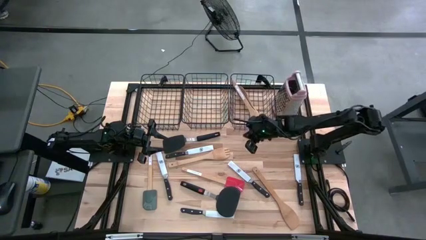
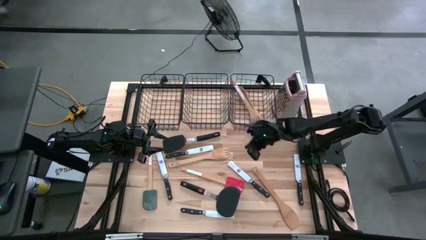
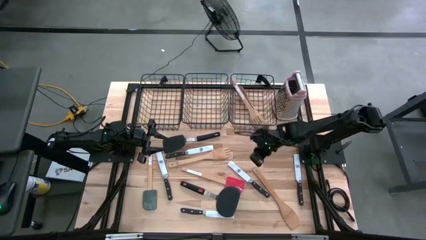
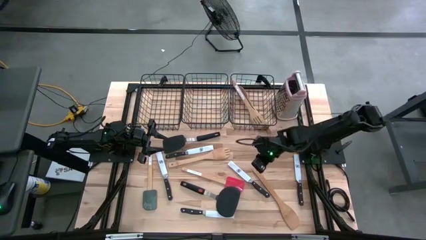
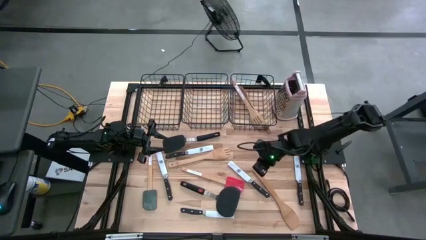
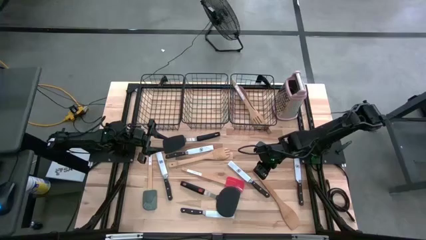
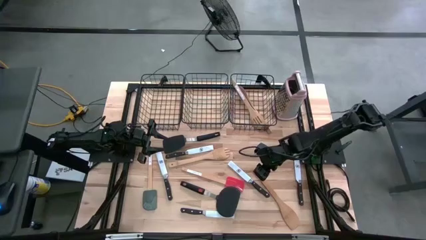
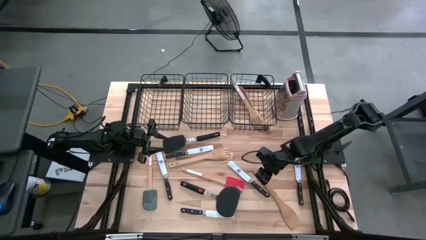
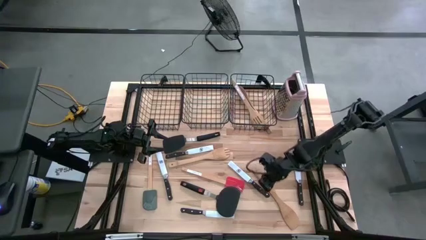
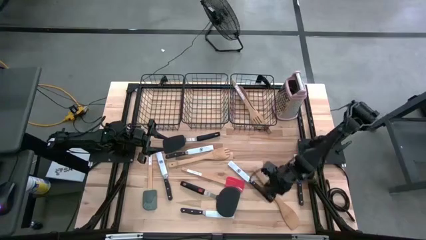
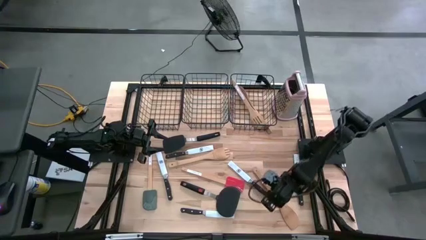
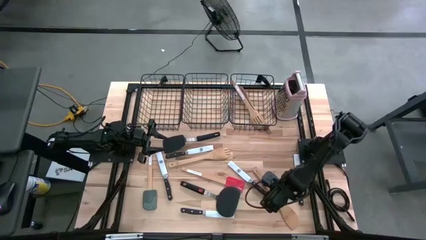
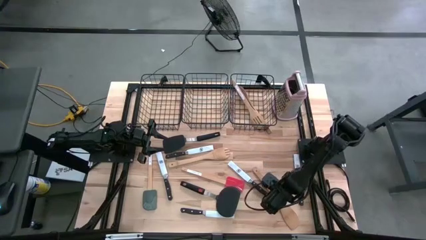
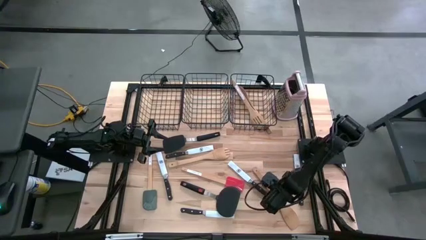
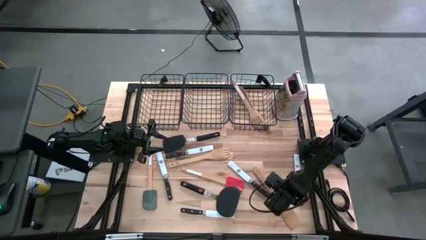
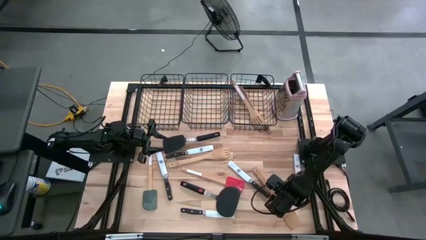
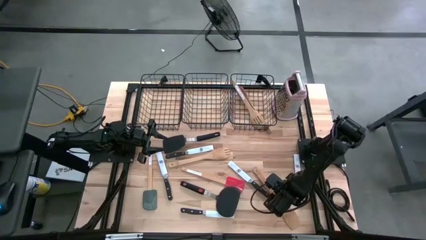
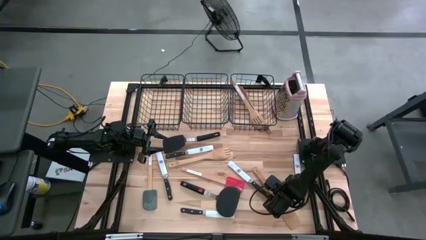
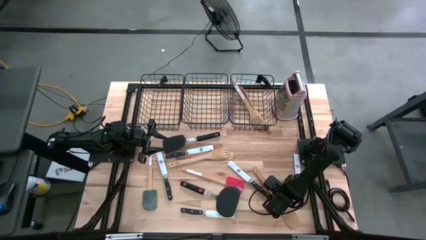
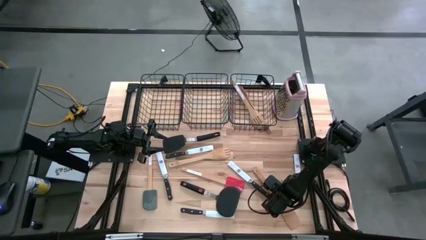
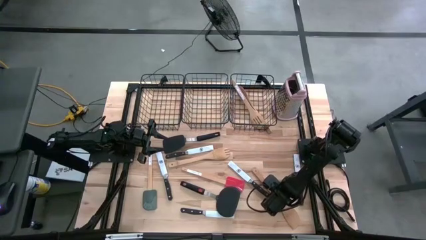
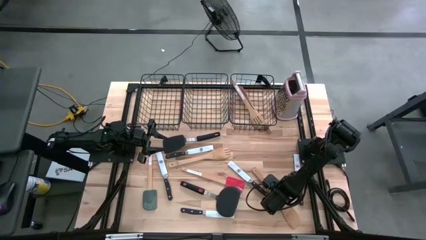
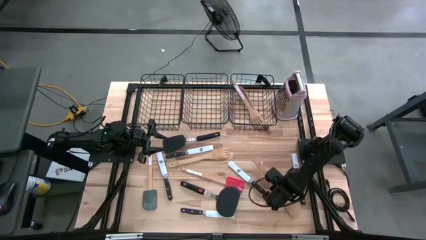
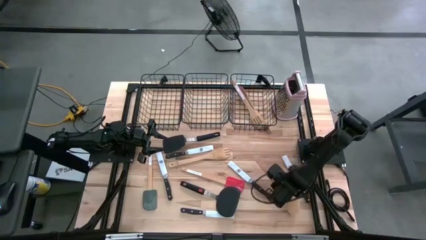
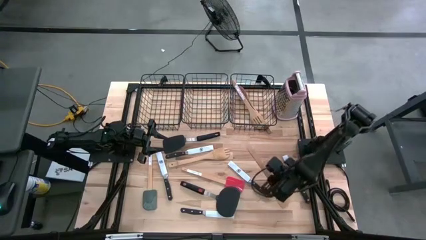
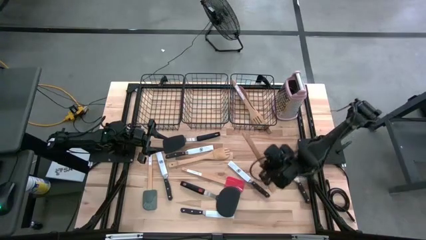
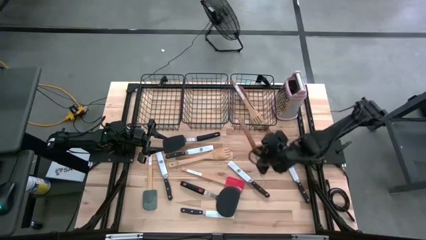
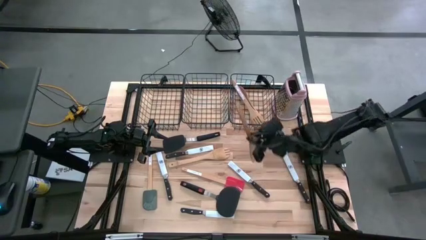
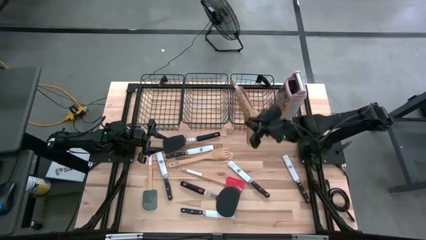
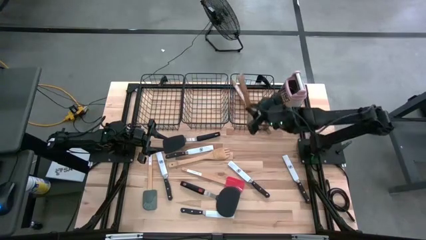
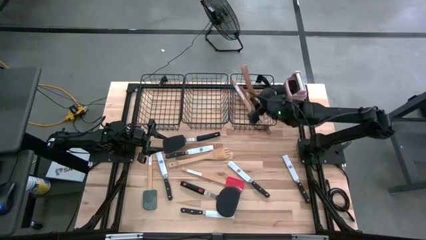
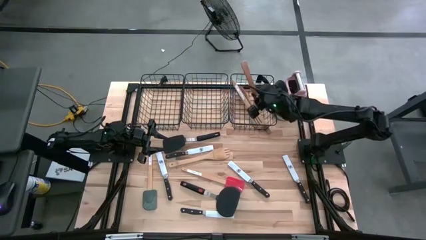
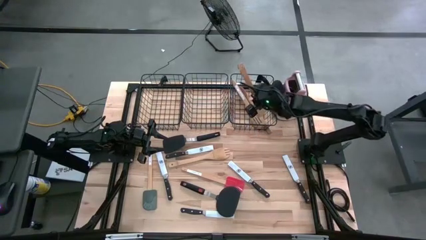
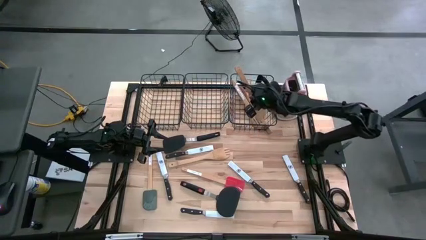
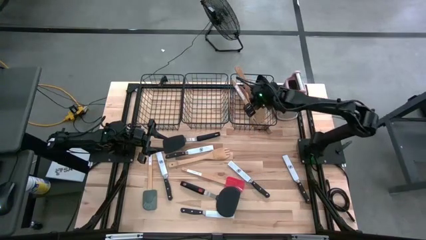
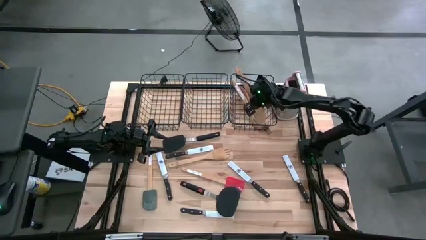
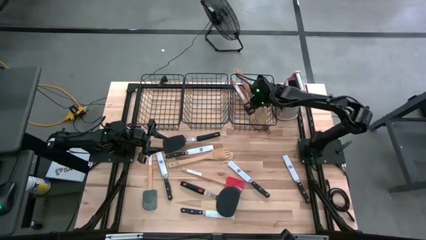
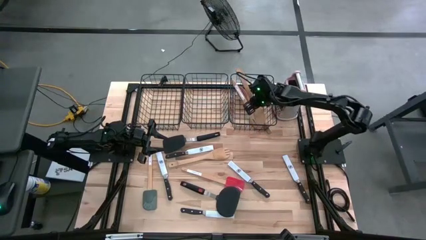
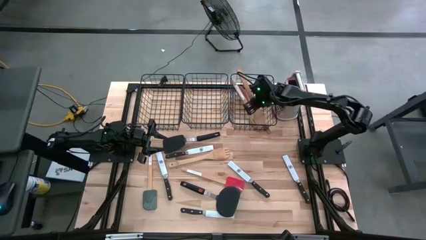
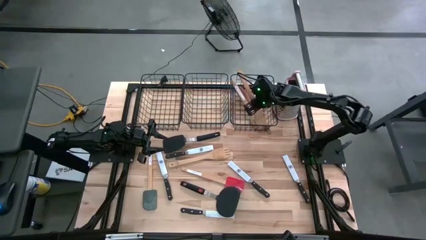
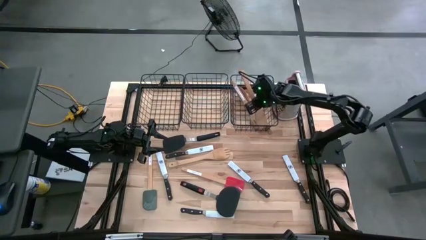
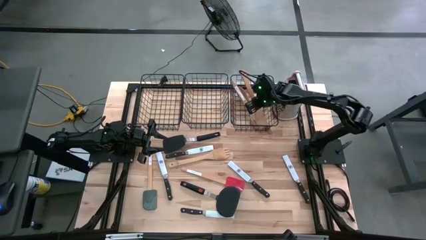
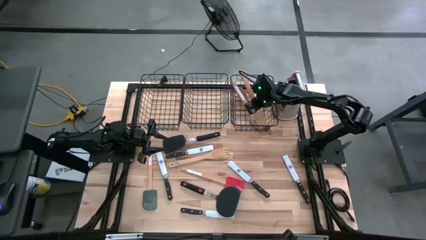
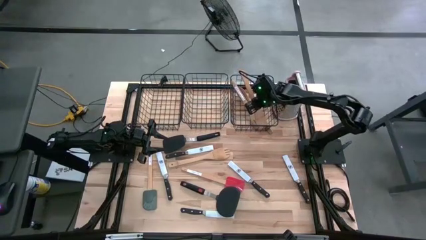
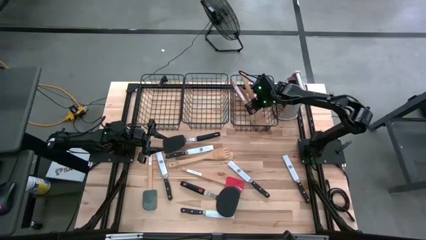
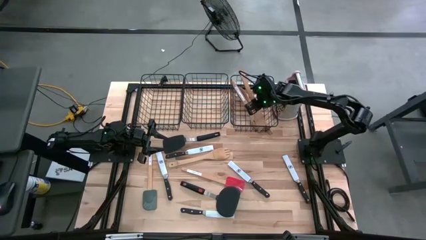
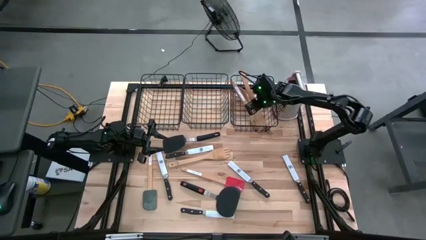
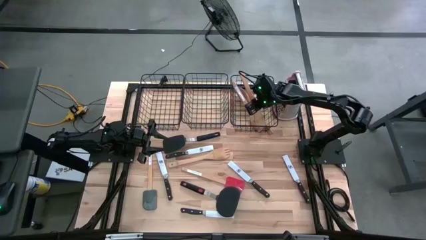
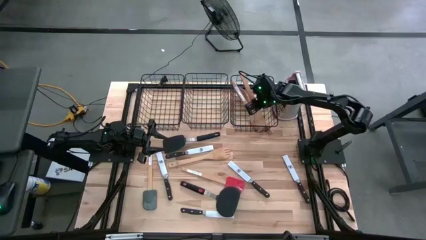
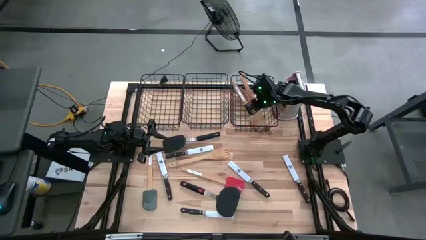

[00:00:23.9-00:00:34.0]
Task: Pick & Place Kitchen Items
Put the brown serving spoon into the right black wire basket
